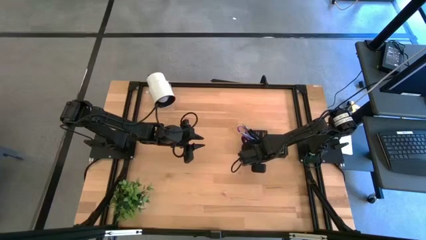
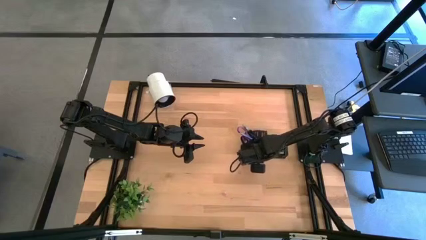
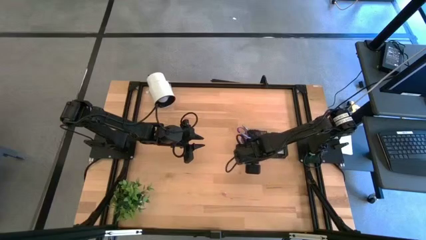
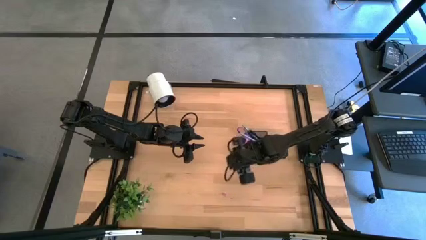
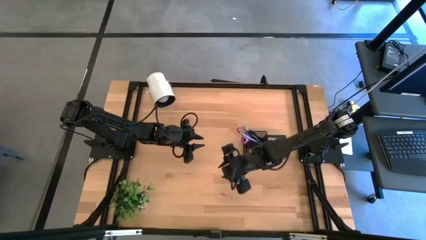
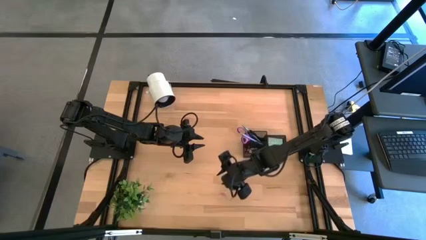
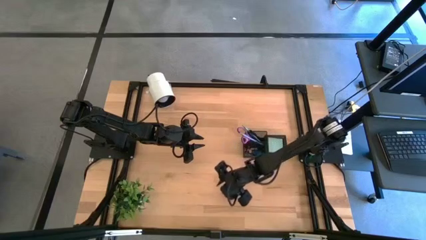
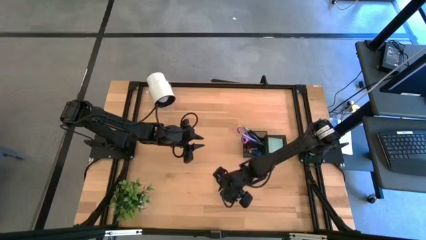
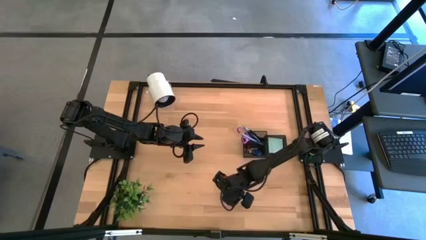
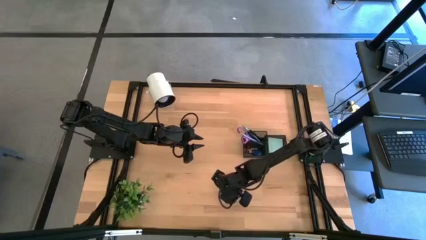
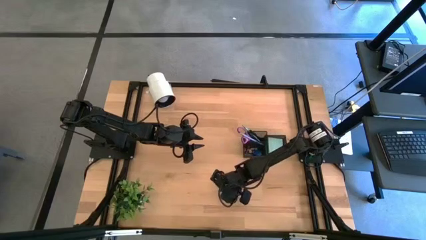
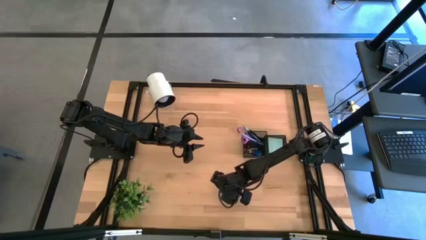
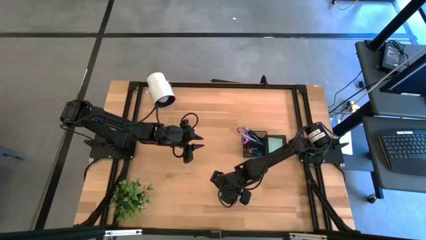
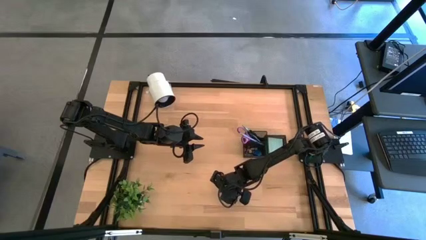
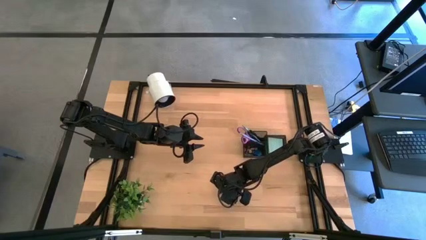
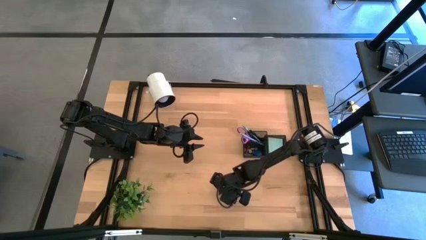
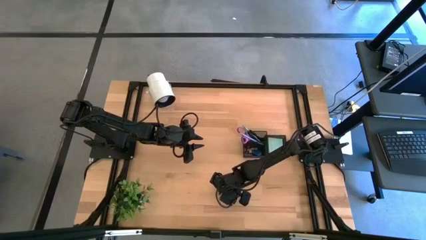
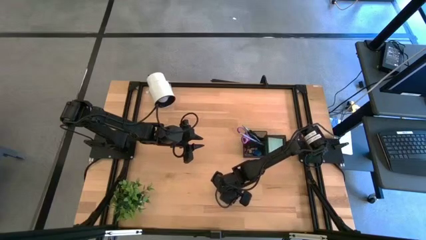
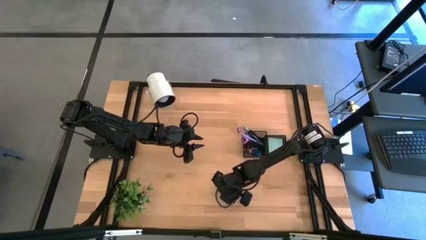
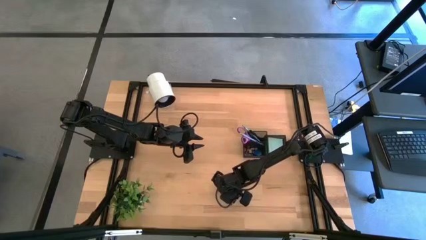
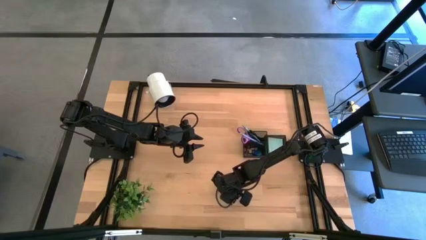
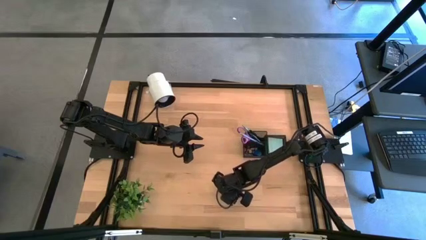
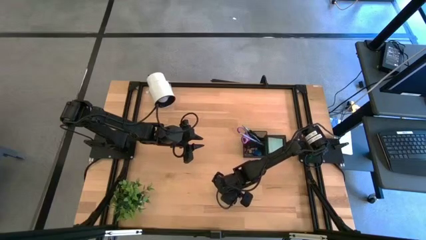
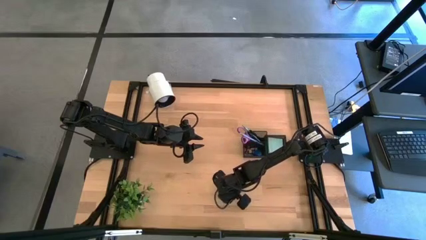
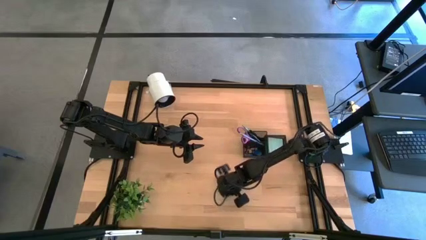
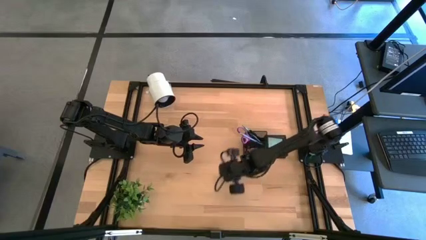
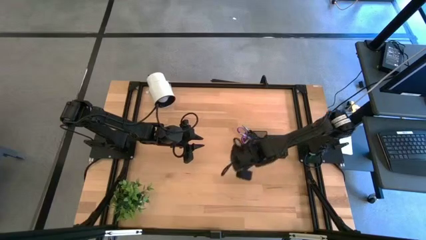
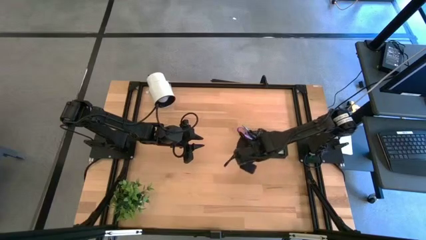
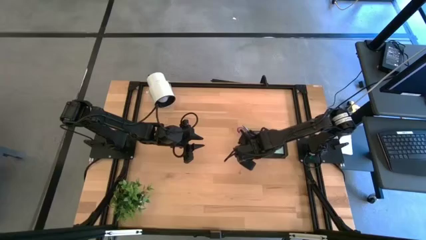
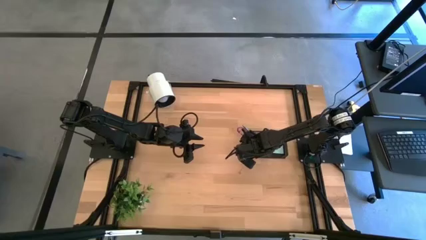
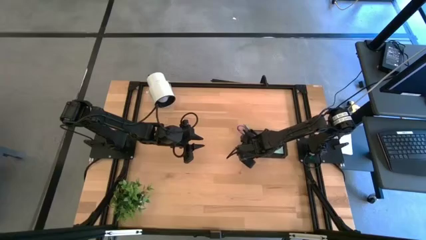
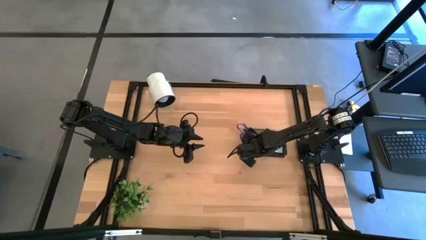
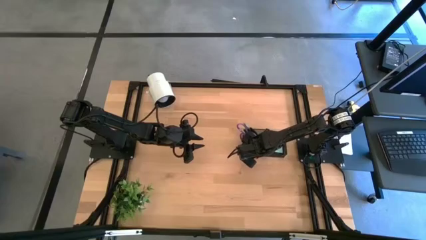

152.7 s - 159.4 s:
Task: Pick and place office supplies into organizer
Put the pink binder clip into the black desk organizer

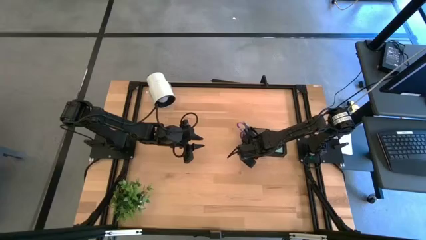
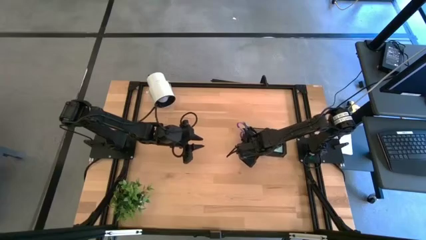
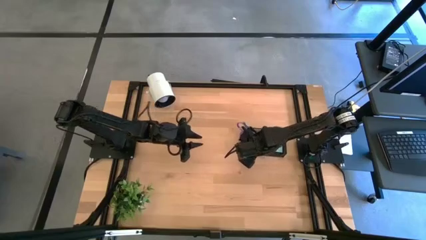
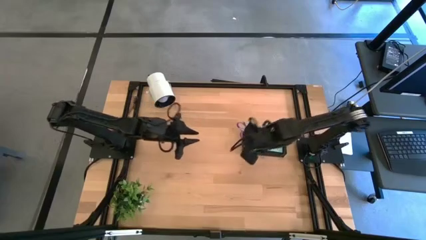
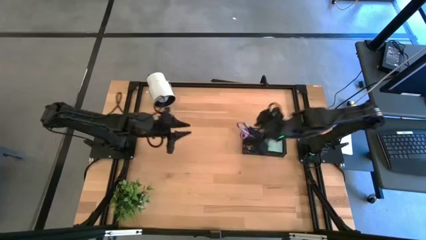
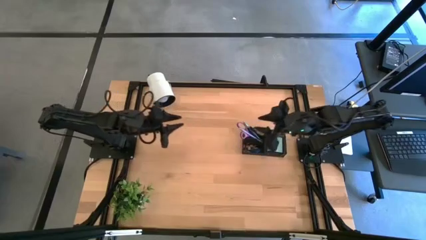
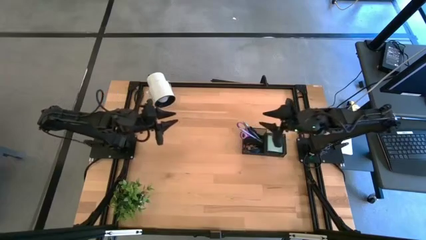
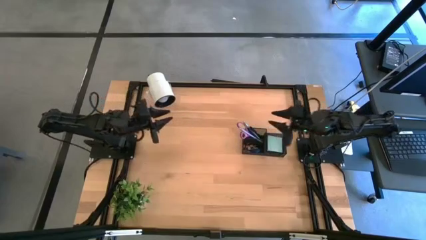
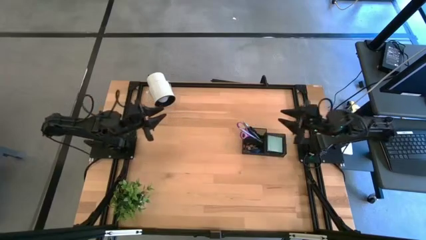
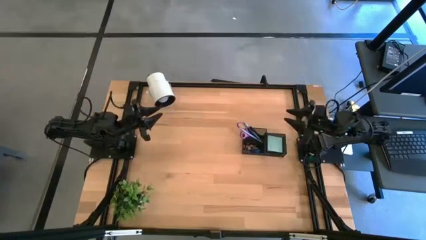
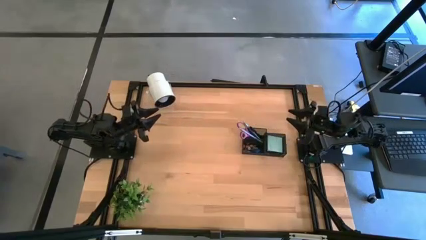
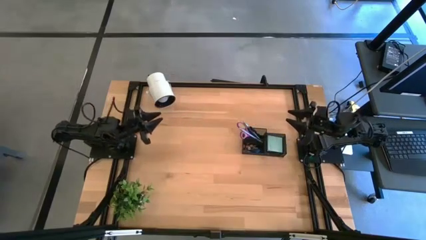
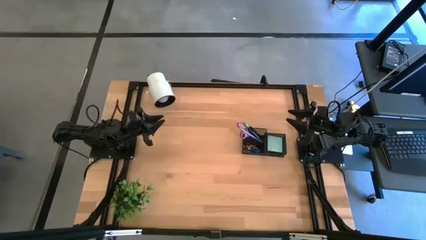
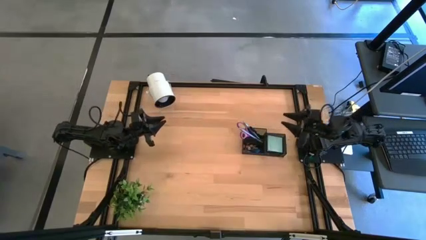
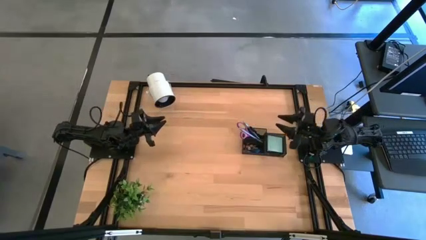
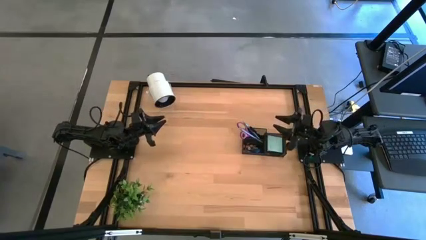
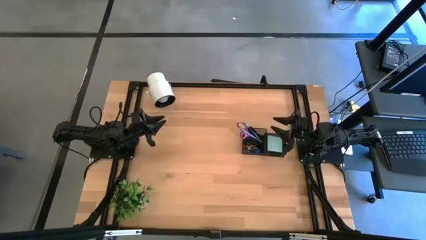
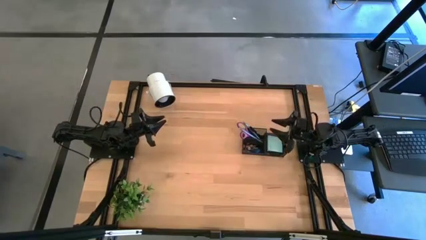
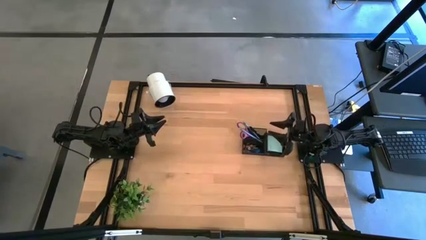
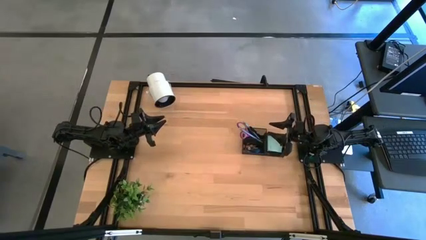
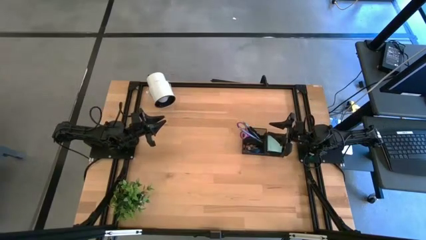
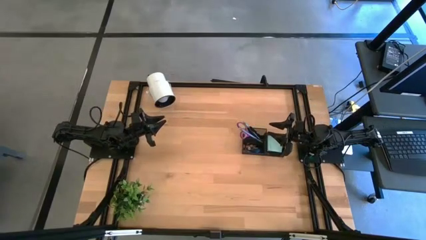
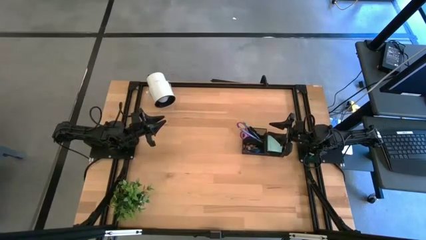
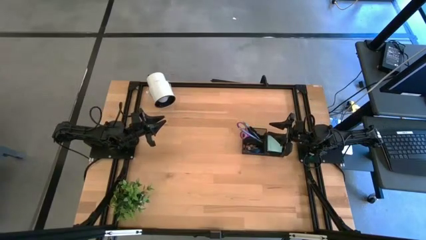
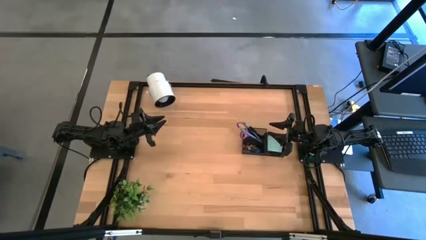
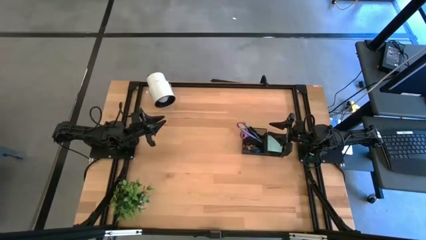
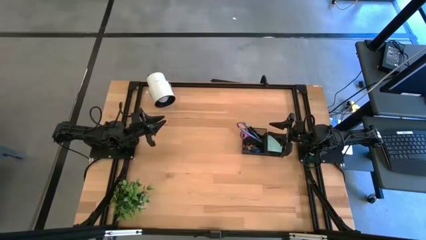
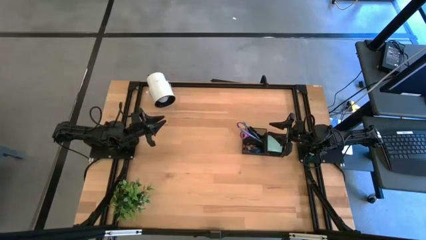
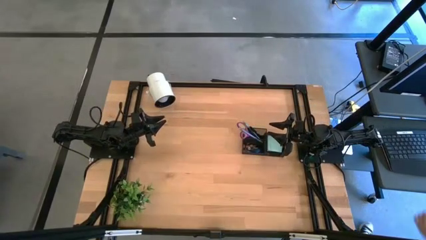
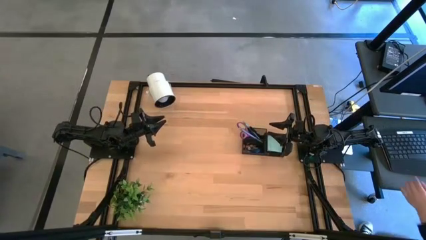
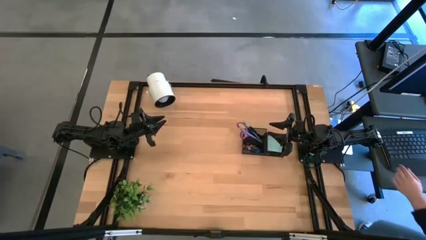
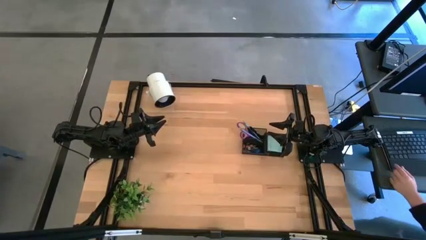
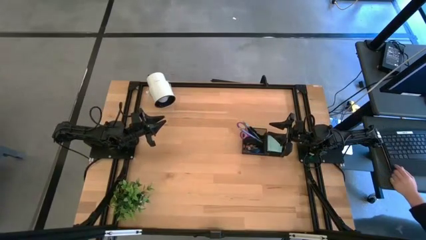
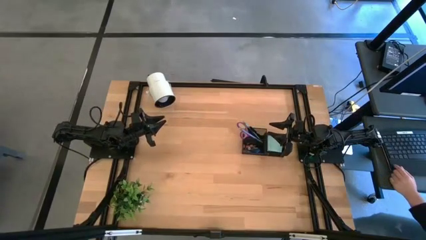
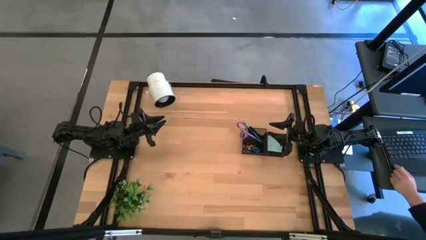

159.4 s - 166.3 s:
Return to Home Position

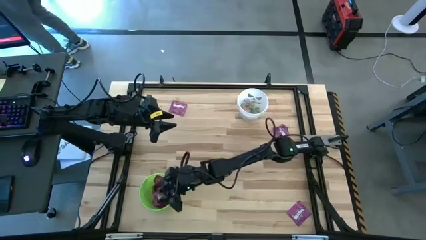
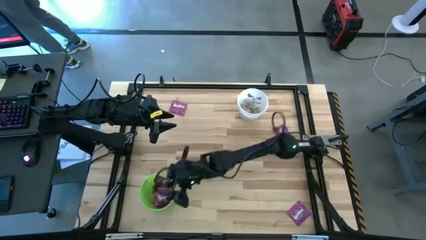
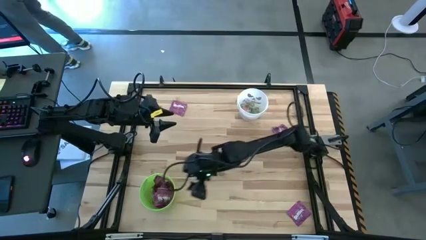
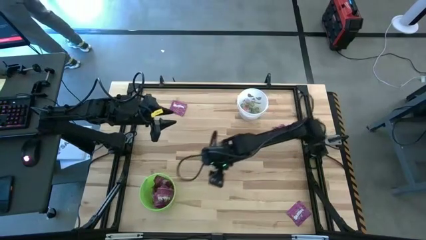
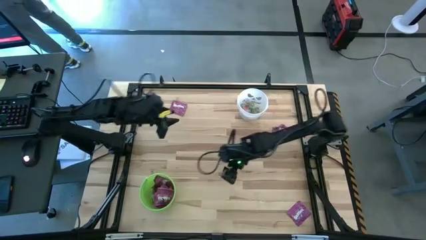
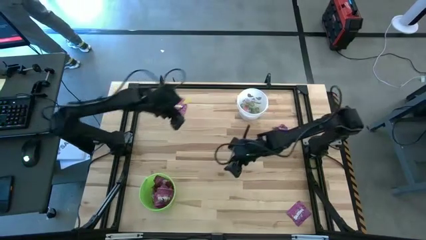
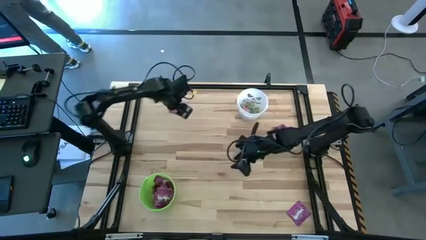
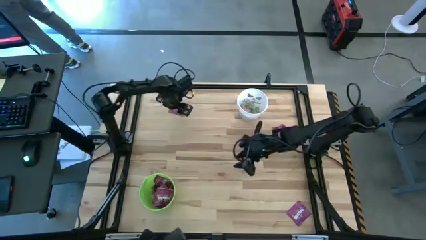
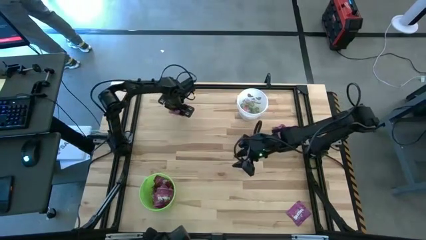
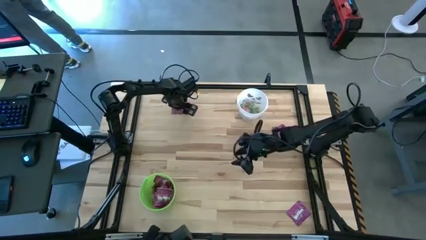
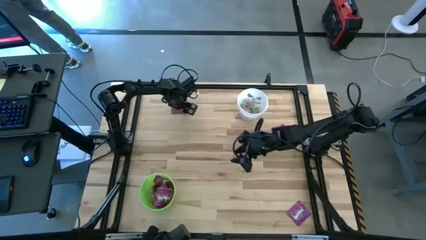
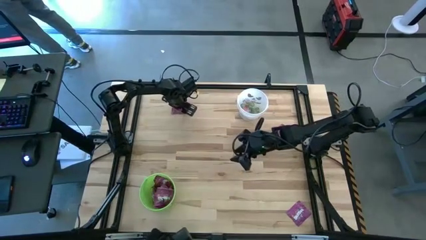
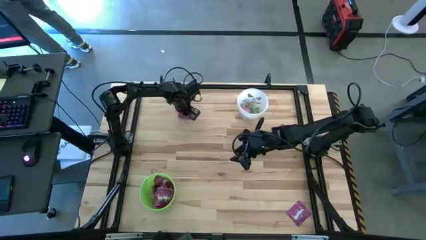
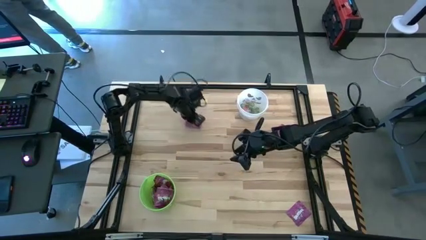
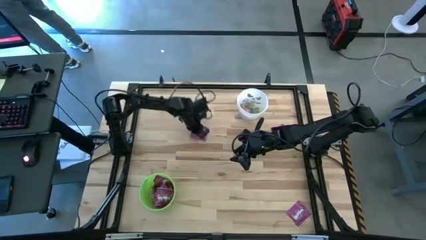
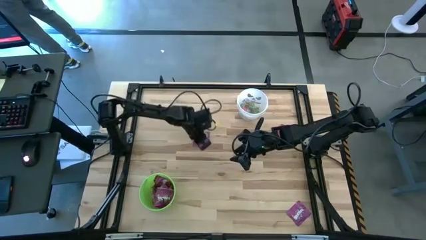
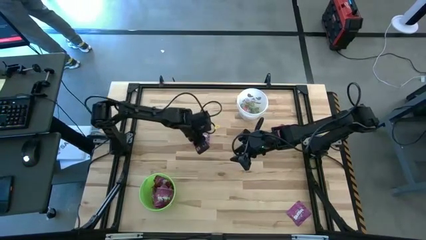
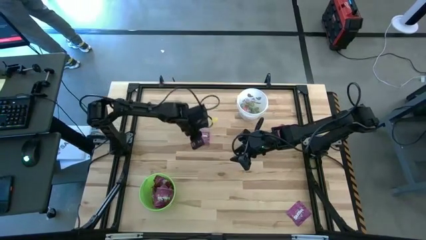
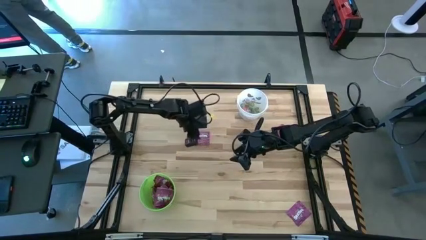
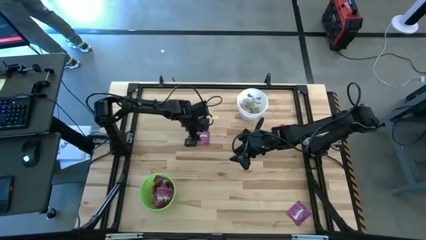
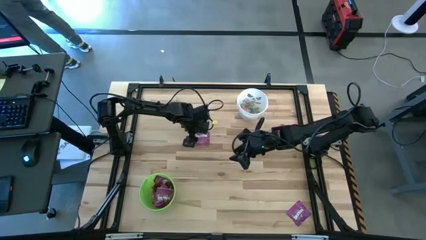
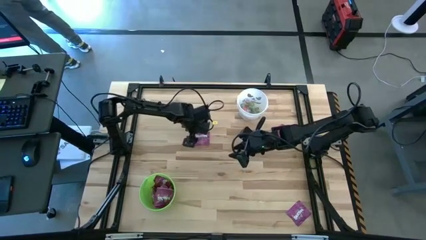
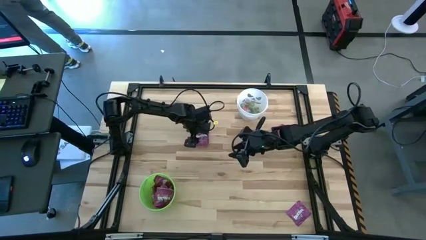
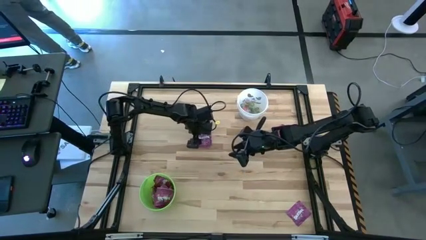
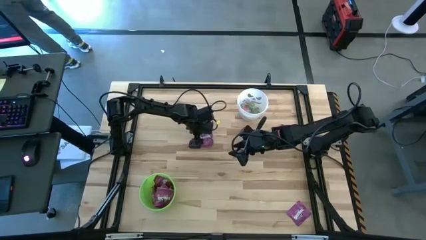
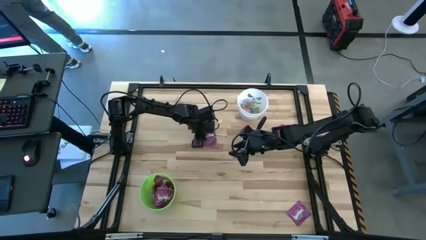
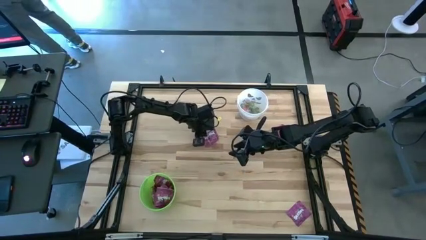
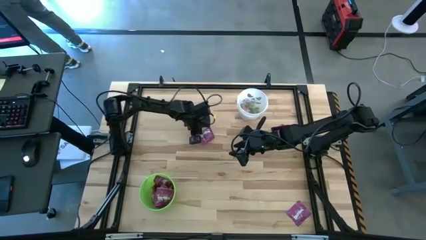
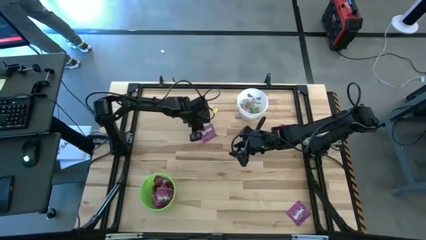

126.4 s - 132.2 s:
Task: Sort candy by brand, put in halloween buckets
Put the purple candy into the green bucket
